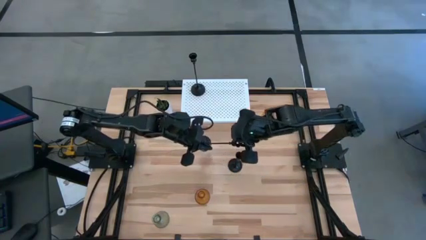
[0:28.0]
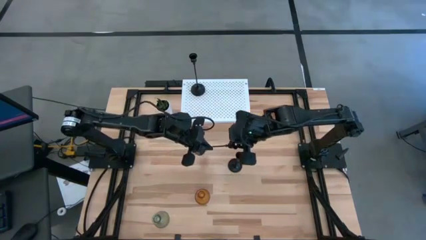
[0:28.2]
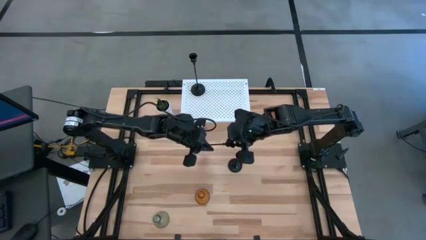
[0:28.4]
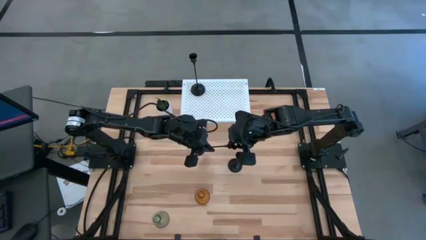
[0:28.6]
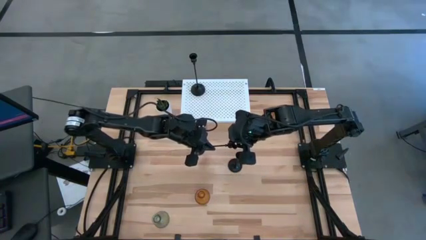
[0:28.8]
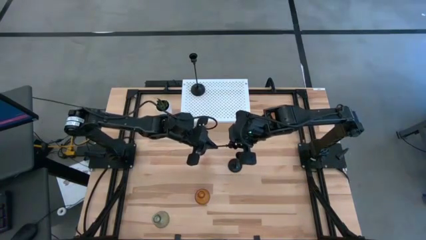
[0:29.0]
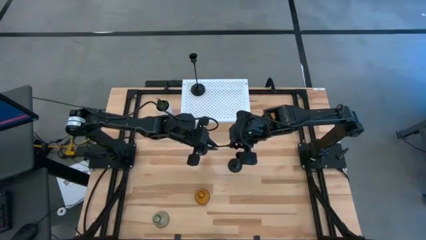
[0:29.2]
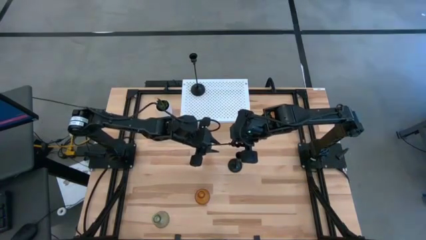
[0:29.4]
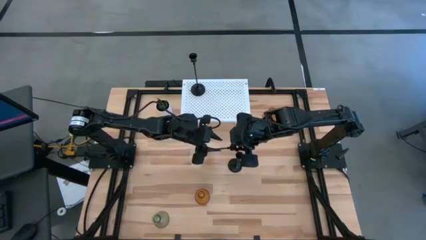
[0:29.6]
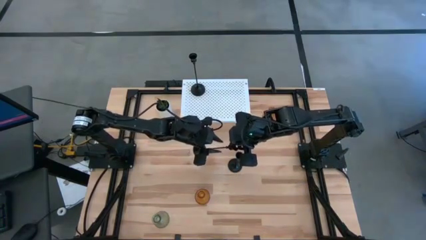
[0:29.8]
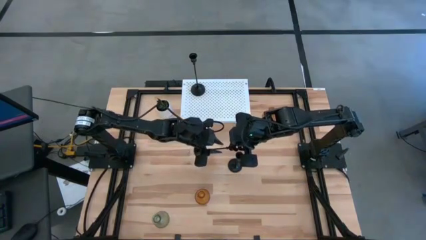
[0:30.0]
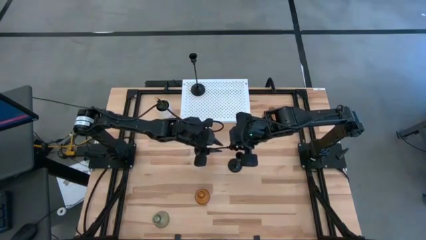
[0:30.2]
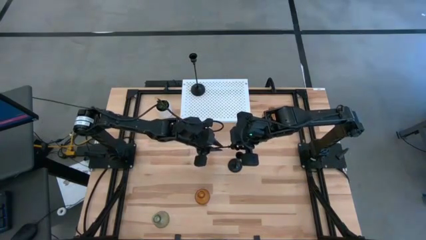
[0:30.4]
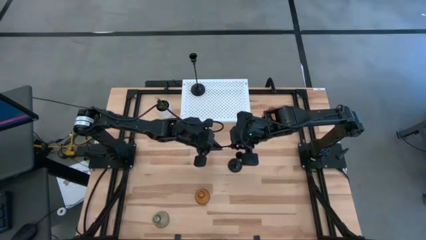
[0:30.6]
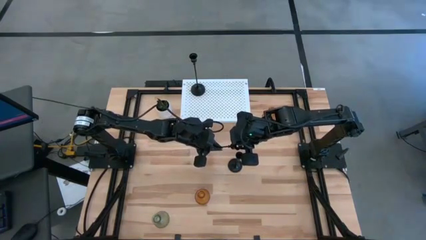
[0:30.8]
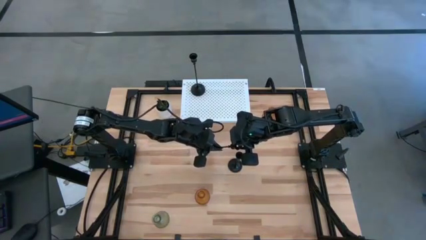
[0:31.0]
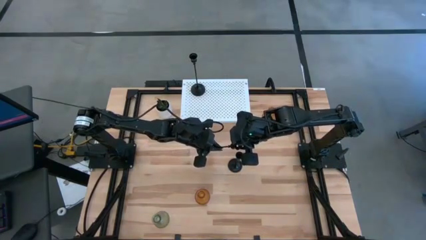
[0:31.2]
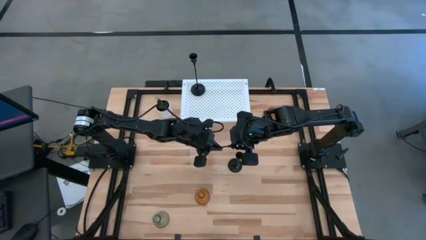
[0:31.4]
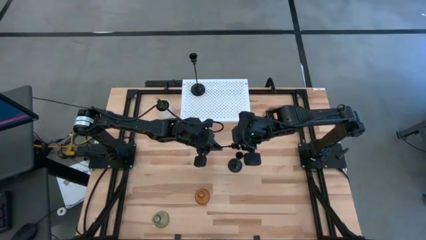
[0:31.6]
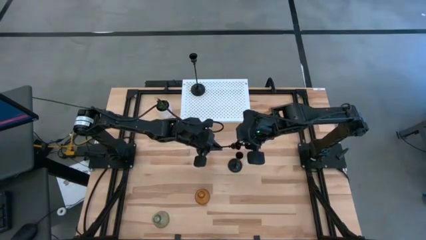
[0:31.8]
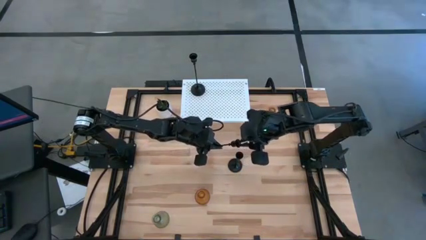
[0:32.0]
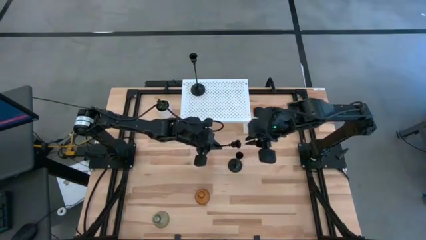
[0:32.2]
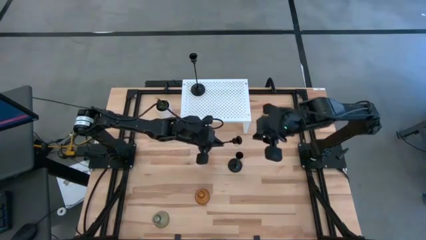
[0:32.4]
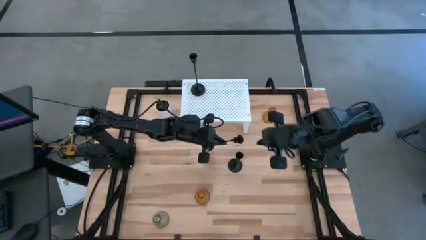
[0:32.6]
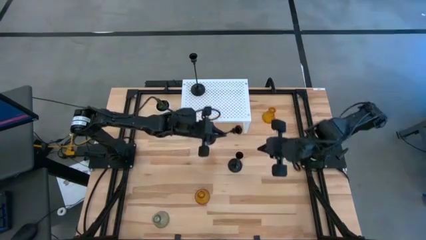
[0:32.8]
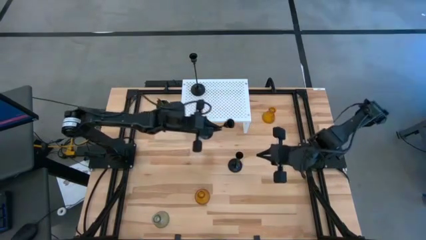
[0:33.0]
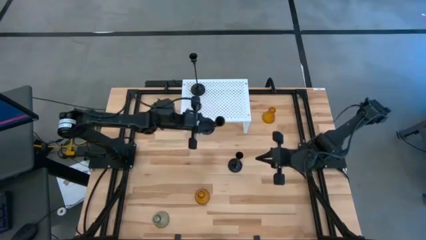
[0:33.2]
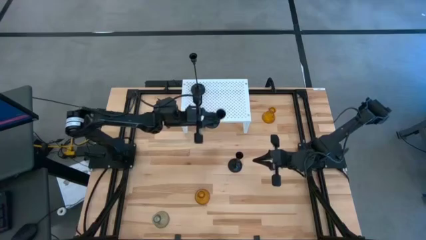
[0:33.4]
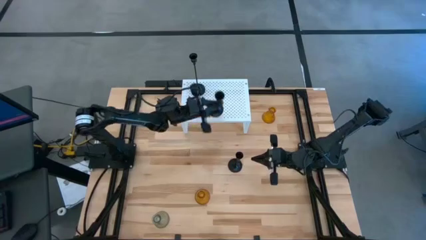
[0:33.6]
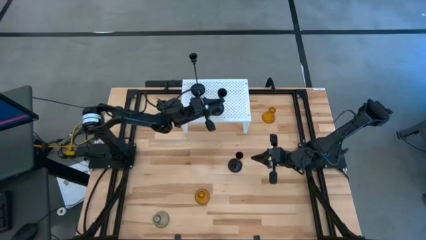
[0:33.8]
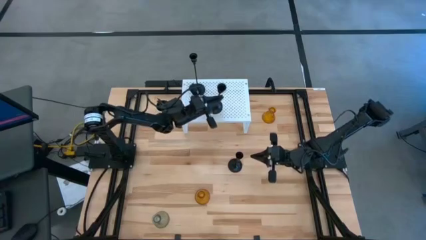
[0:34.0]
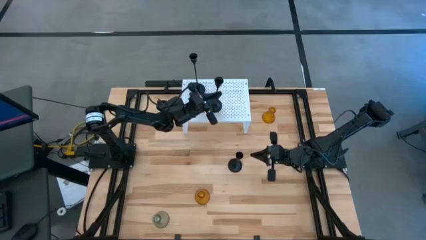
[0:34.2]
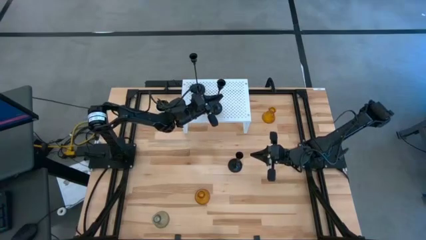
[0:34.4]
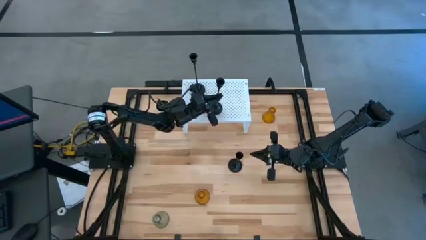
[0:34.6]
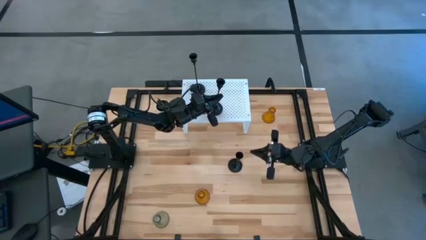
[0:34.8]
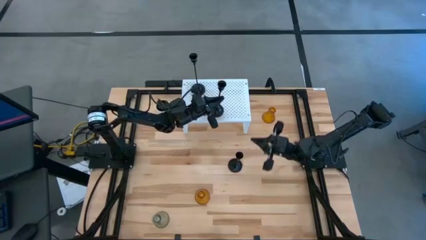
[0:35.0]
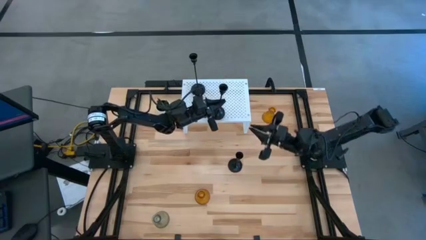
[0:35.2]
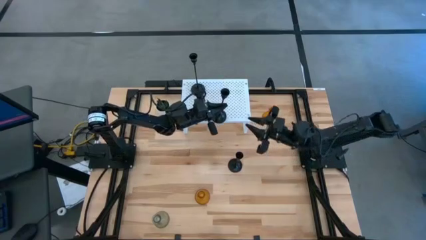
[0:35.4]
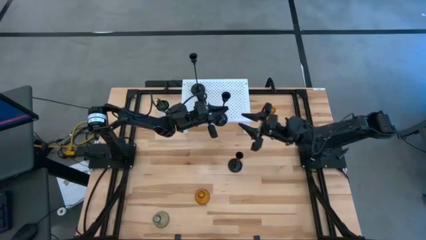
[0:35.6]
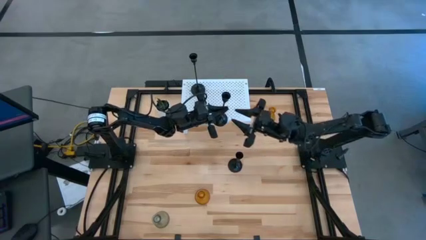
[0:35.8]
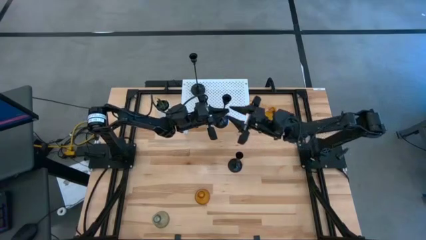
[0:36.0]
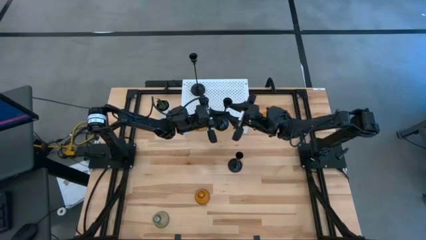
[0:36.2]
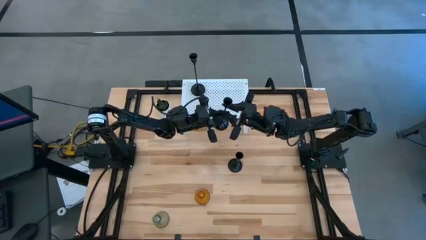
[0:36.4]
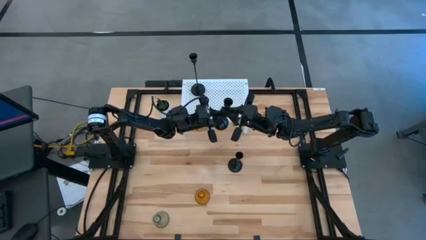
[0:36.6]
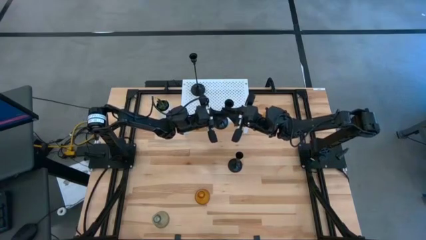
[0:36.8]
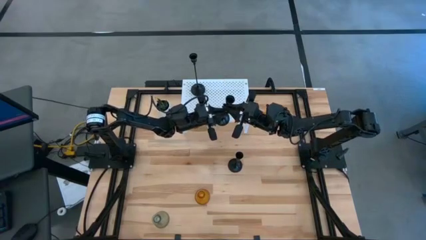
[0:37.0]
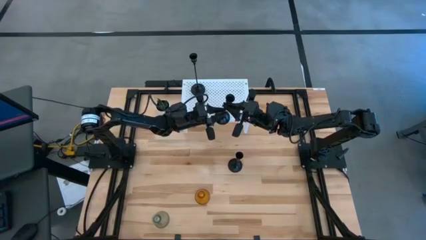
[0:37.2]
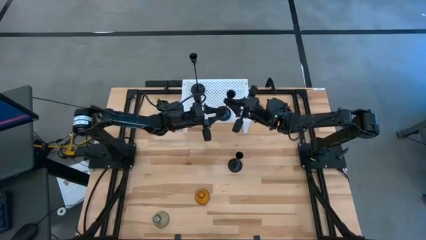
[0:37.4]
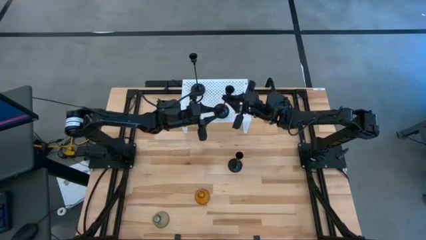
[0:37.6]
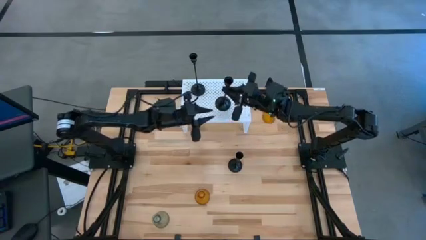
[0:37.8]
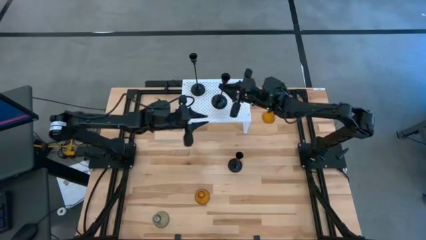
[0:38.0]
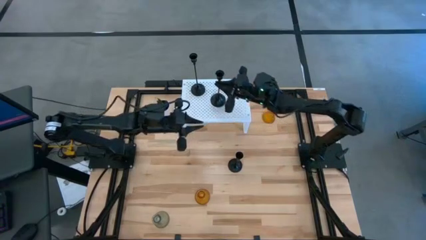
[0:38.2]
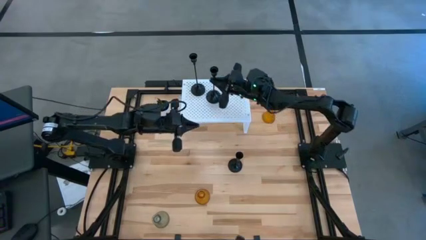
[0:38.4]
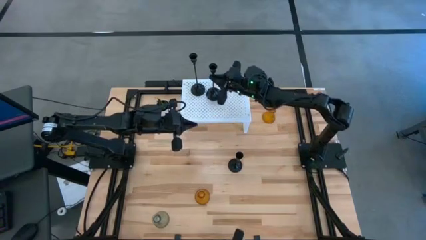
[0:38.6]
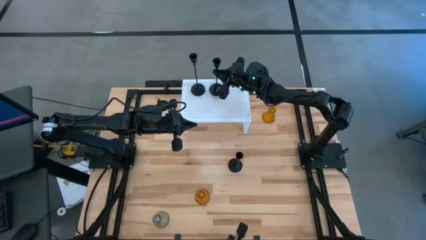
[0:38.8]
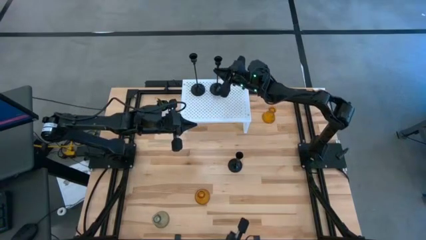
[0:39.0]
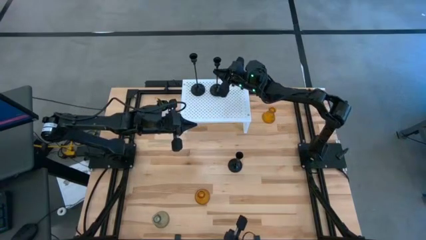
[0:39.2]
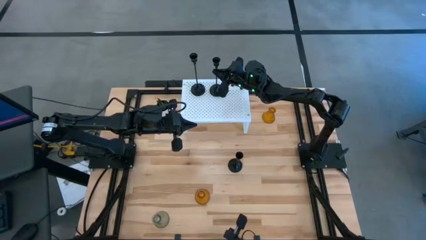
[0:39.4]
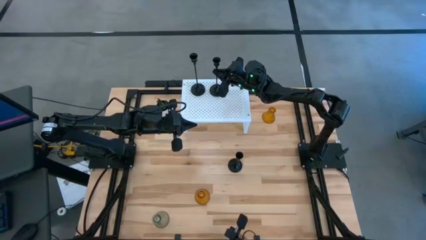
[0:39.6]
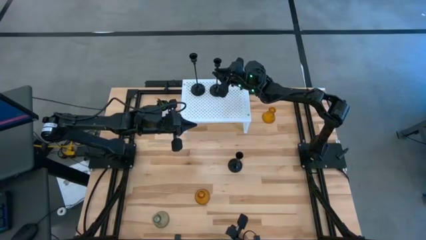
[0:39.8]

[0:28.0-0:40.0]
Task: Pick & Place candle stick holders
Put the bottom black candle holder on the shelf aligned with the other black candle holder
